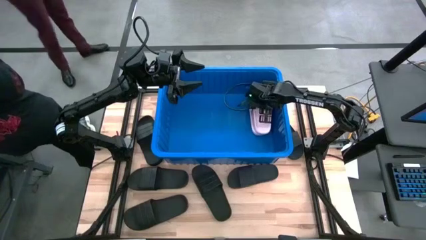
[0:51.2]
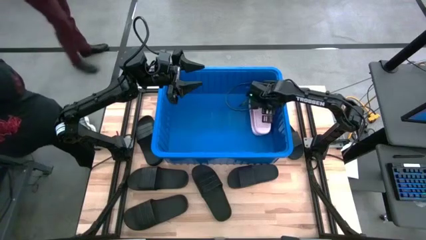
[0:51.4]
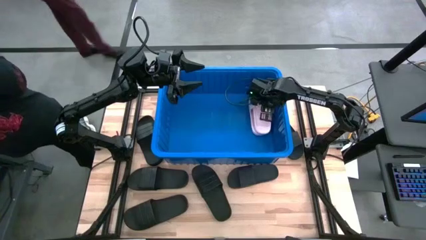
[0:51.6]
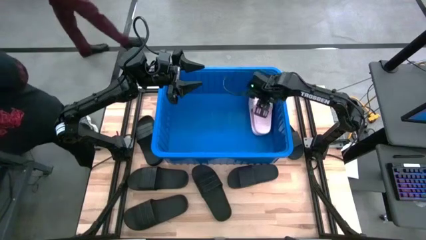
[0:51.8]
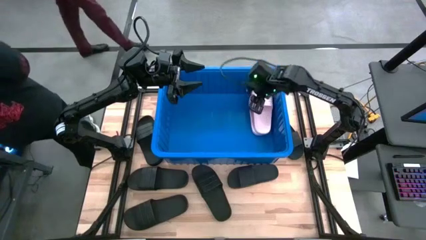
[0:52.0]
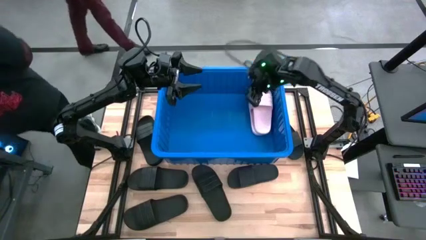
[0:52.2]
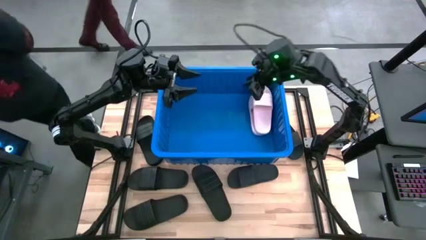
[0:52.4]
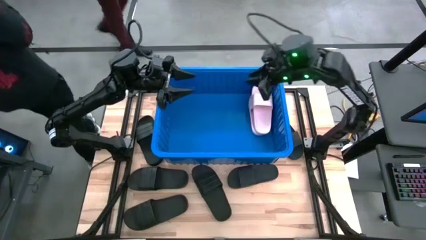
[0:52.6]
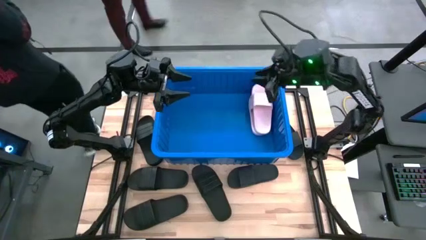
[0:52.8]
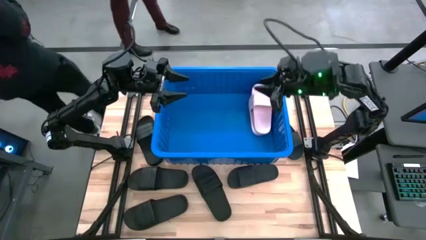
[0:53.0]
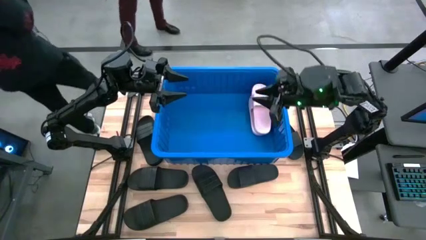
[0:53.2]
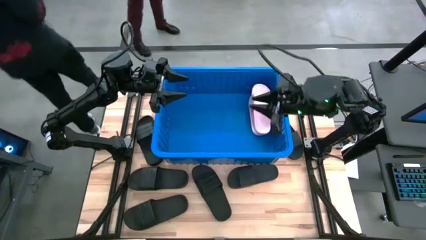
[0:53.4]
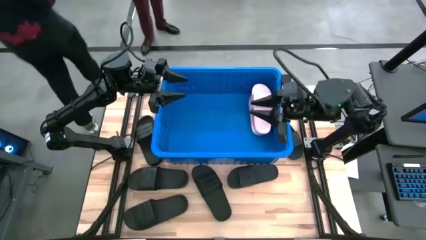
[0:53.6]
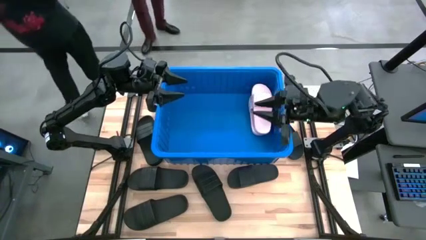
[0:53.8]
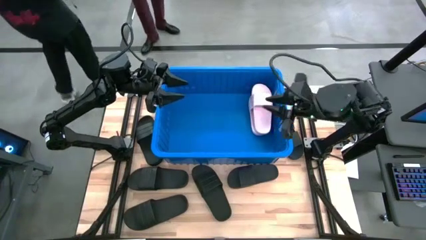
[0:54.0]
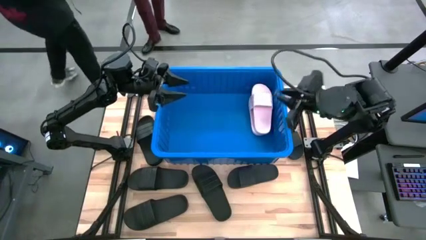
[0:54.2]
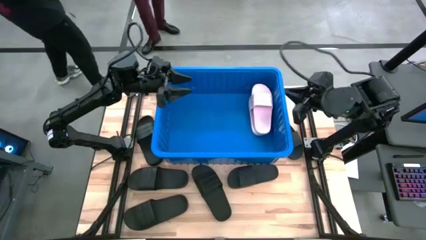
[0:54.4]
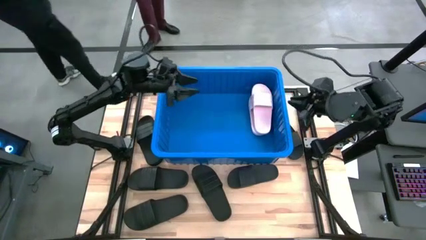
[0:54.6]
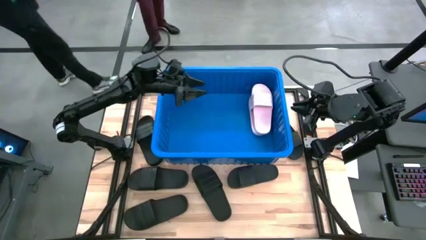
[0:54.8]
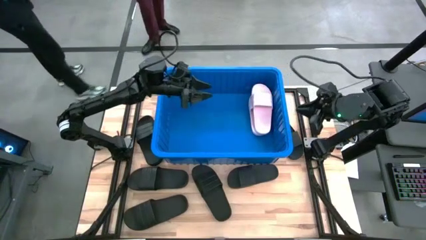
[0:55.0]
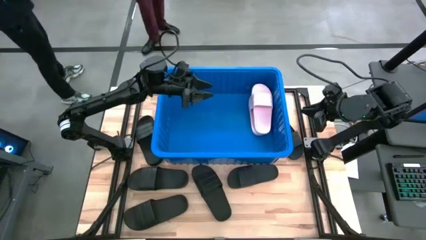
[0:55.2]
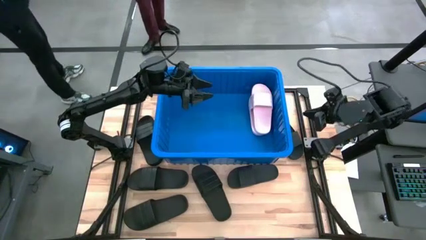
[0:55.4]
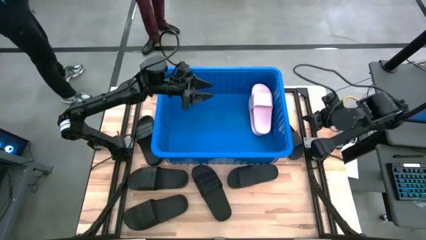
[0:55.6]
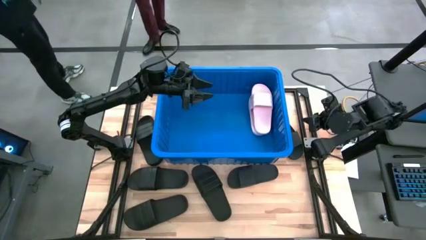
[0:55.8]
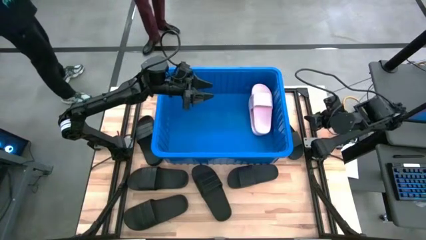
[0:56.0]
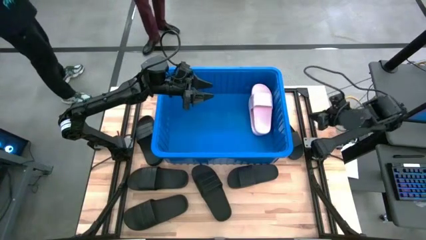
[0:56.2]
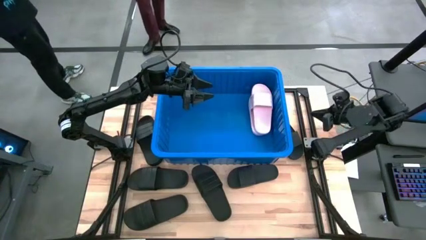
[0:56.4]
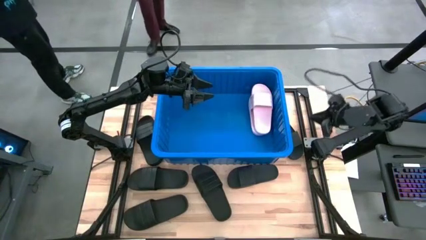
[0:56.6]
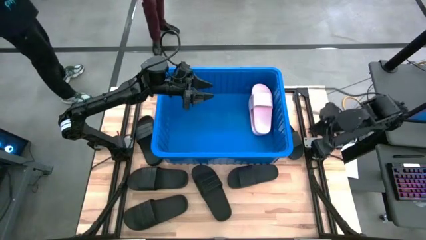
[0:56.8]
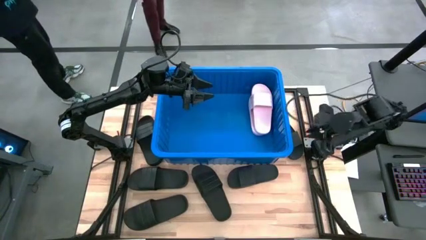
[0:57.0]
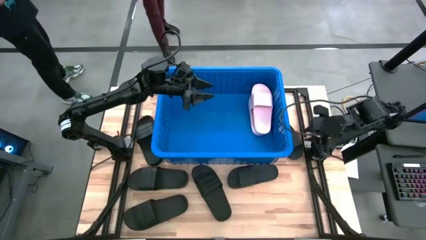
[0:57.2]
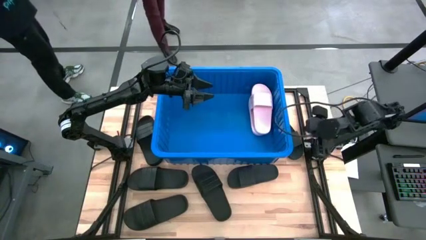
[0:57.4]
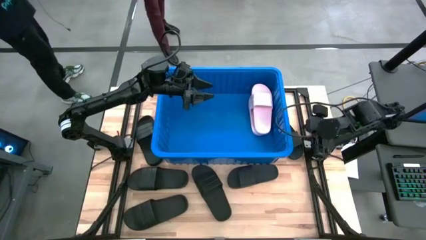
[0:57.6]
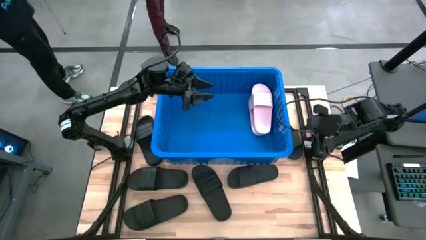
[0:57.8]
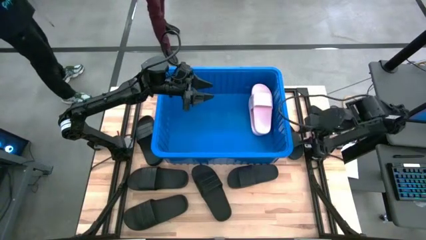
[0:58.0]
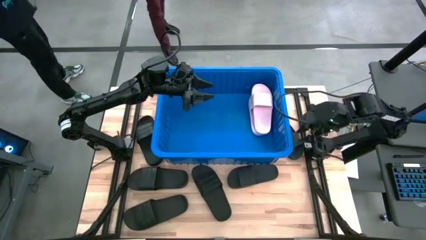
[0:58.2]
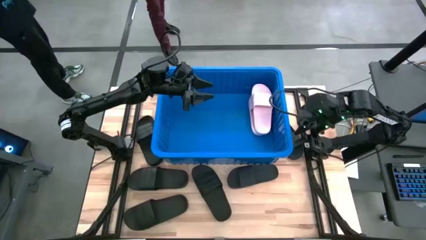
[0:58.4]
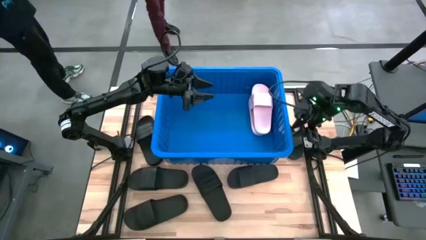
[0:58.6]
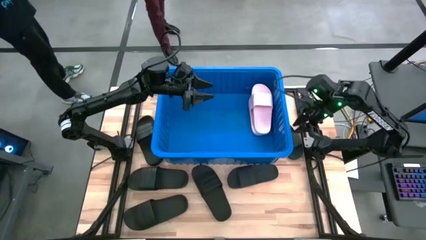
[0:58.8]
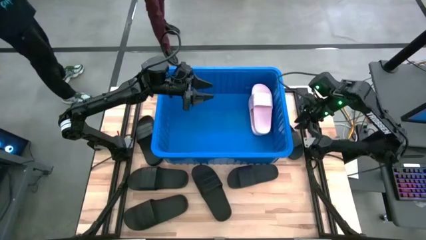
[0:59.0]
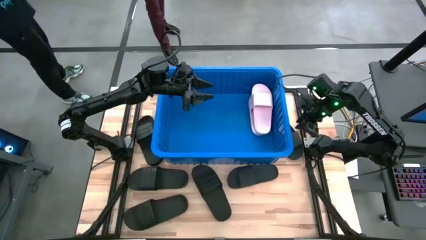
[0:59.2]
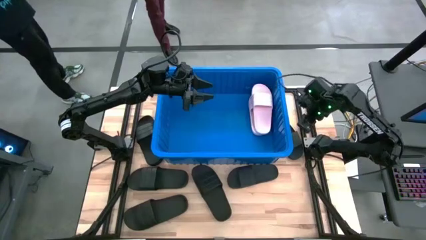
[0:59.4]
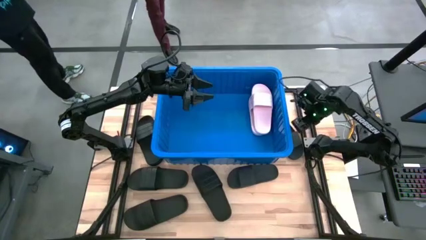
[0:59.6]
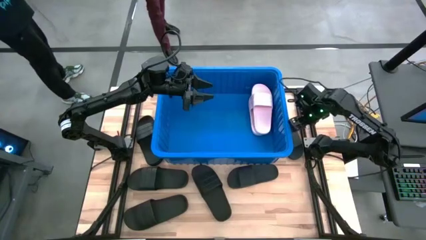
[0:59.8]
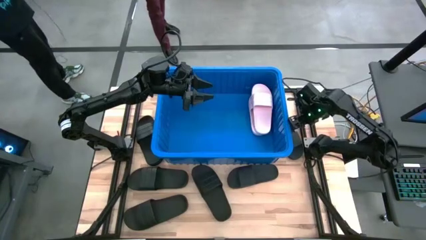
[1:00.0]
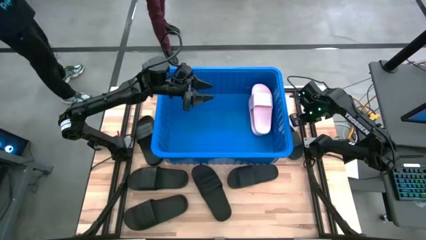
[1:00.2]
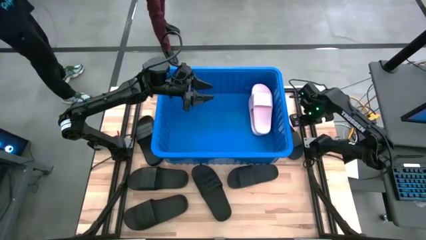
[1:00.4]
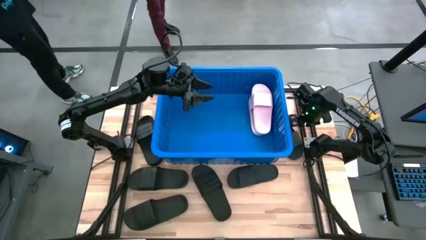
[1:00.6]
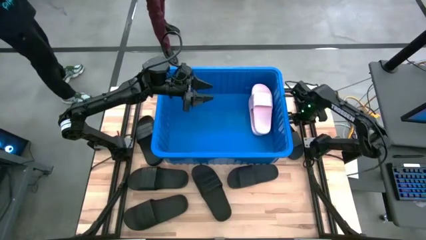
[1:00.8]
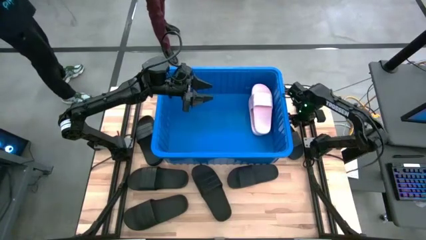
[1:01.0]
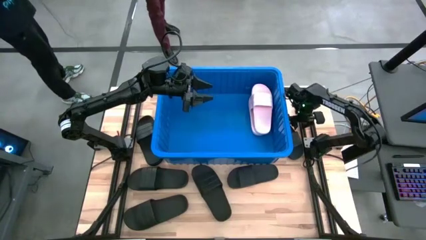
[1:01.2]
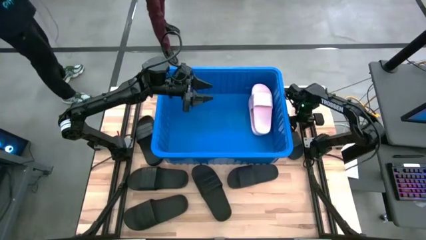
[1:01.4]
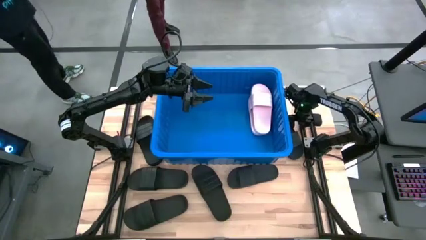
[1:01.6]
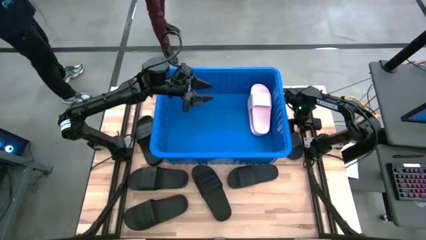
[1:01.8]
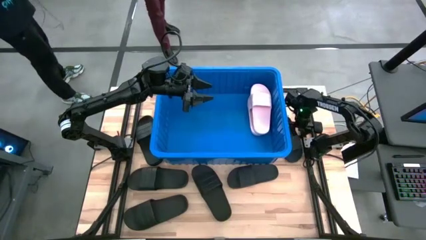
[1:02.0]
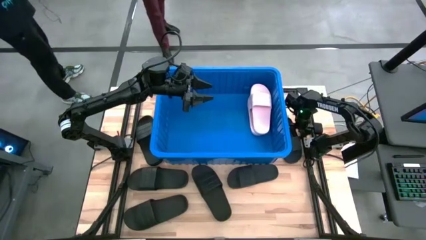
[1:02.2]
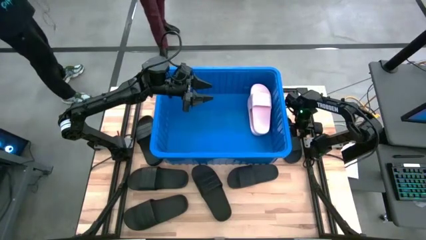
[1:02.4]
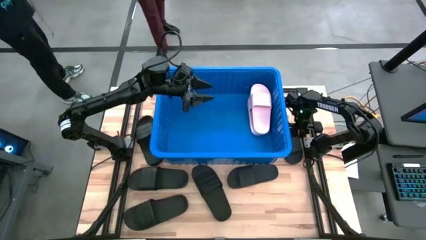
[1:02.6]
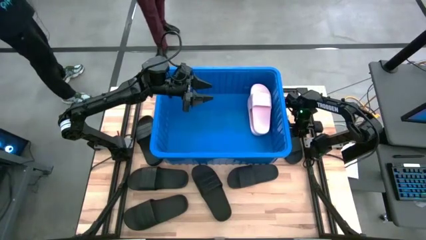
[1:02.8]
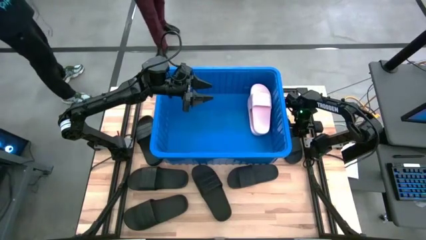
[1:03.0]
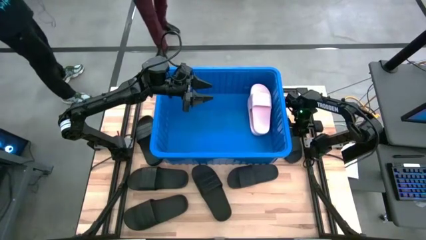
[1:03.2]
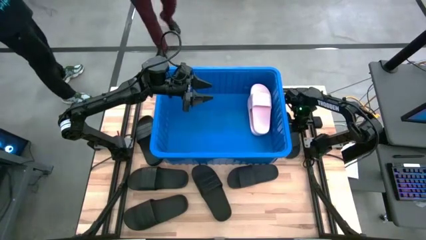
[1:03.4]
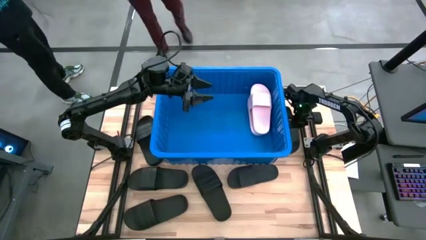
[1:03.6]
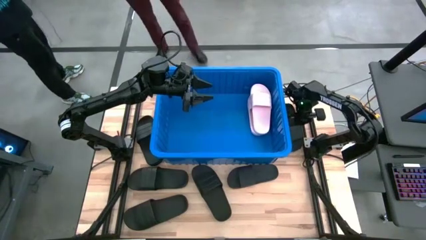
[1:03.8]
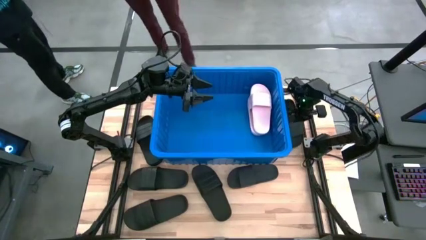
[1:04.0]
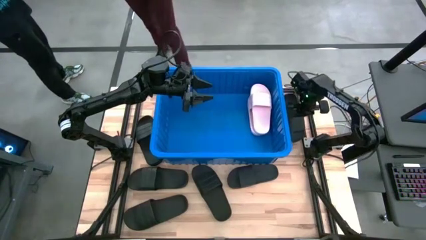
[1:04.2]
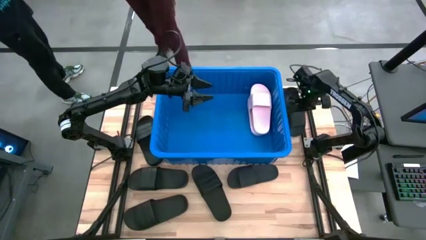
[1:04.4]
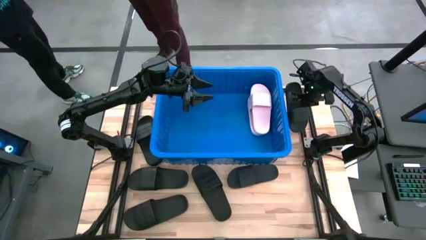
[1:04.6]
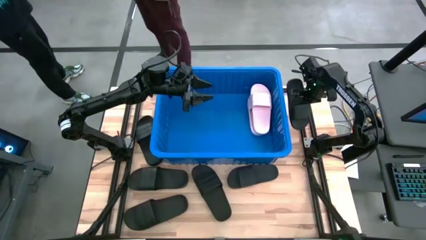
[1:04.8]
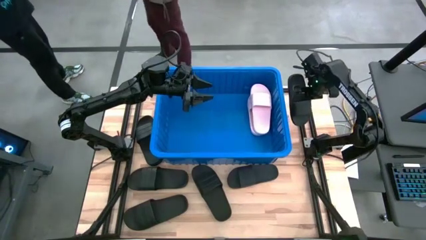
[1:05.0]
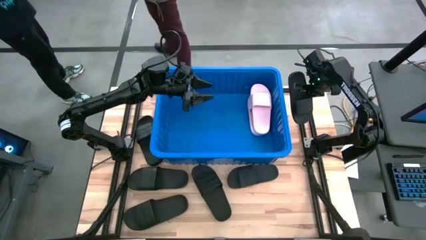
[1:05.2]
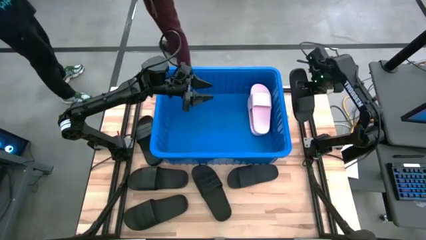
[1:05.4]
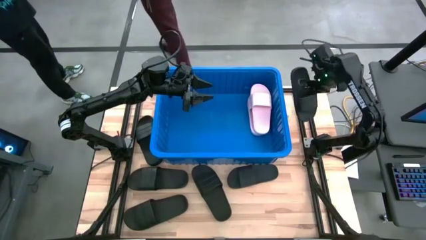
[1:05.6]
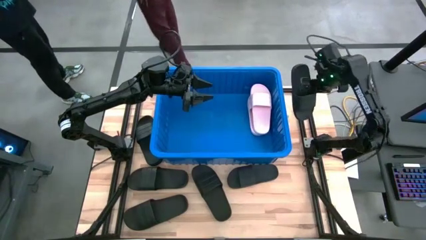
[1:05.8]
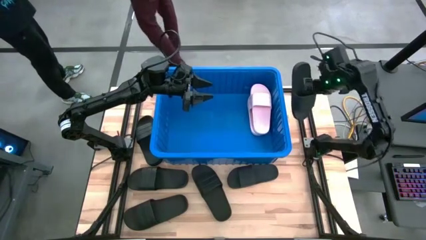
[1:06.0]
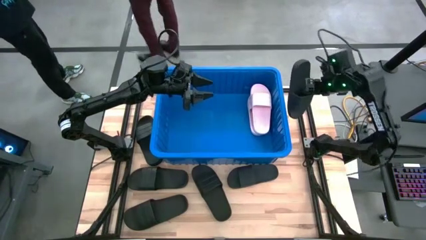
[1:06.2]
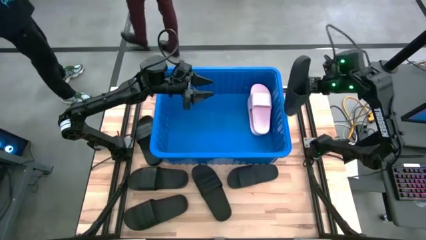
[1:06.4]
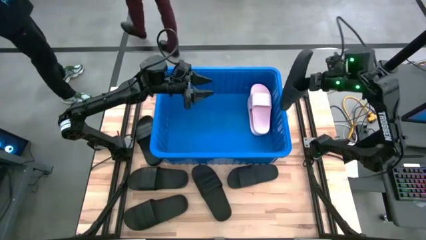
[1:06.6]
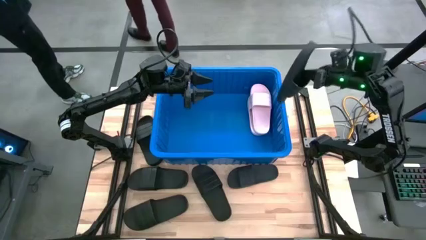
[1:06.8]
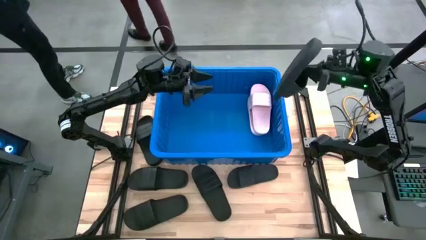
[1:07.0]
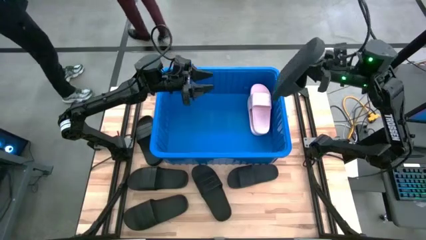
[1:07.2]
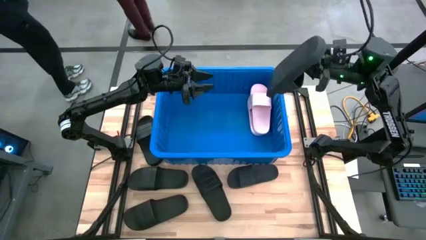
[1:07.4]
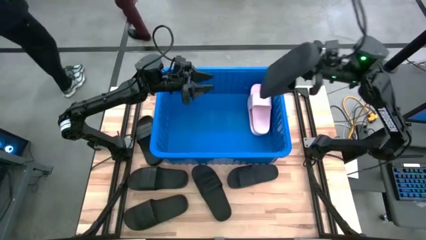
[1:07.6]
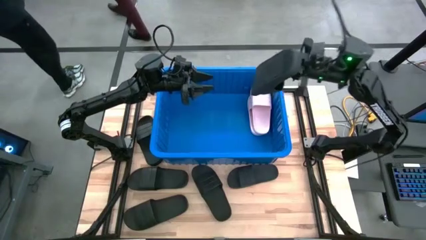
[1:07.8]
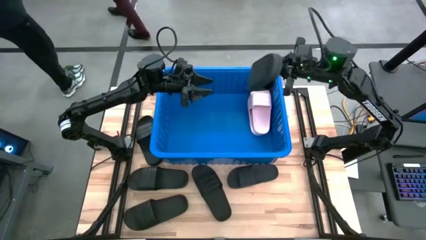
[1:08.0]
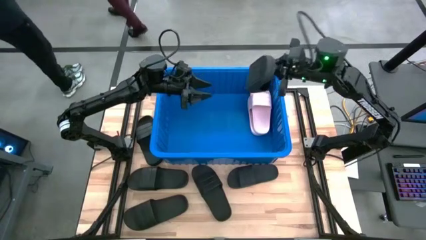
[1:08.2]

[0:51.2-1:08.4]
Task: Pick and place slides into bin
Put the black slide into the blue bin
